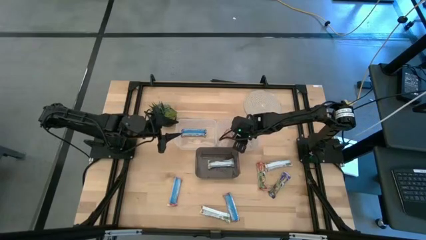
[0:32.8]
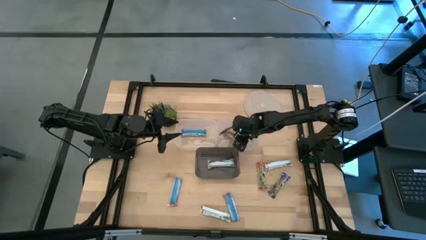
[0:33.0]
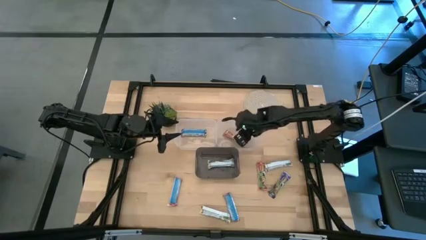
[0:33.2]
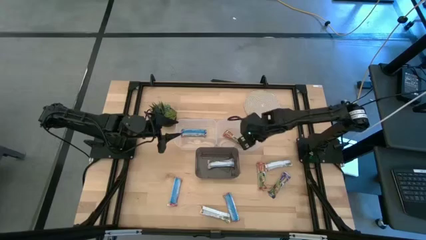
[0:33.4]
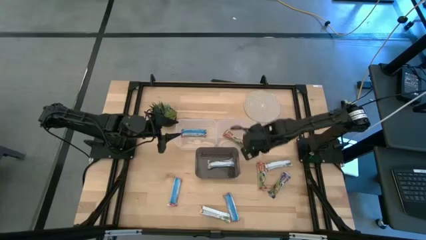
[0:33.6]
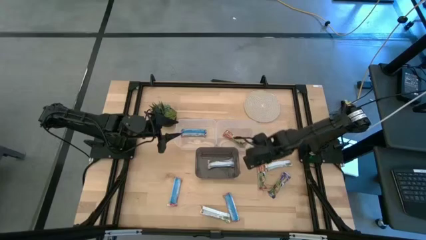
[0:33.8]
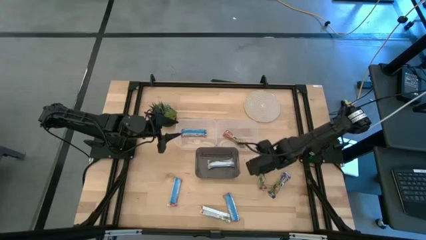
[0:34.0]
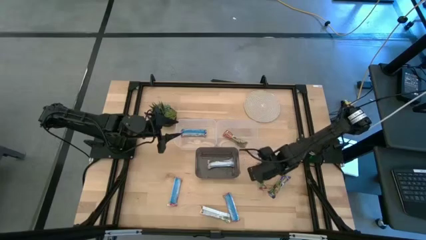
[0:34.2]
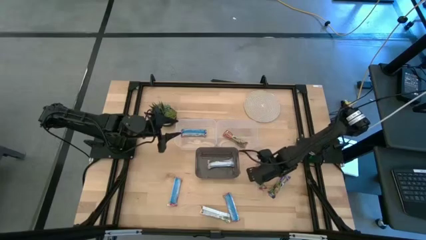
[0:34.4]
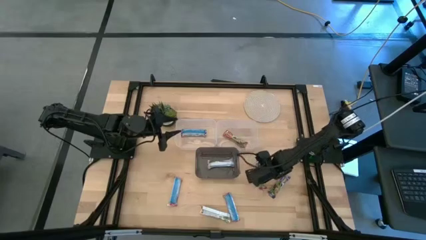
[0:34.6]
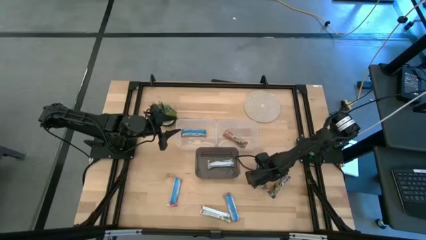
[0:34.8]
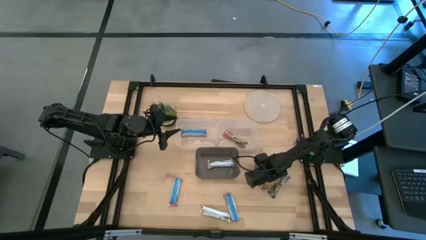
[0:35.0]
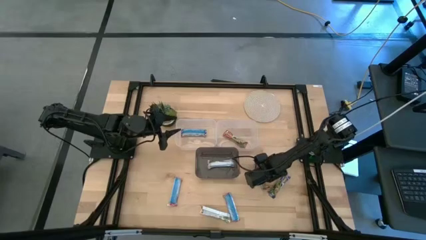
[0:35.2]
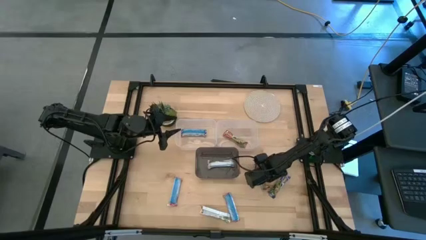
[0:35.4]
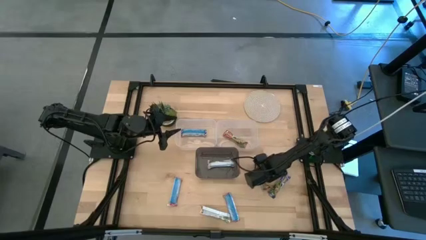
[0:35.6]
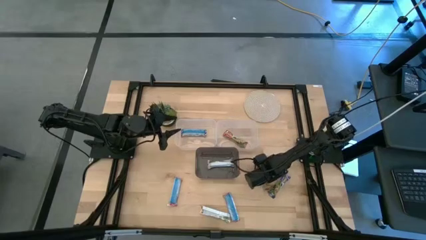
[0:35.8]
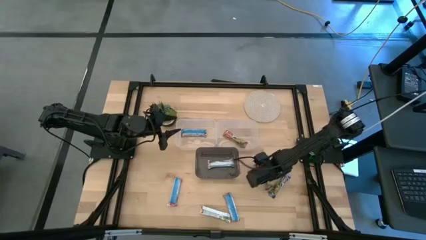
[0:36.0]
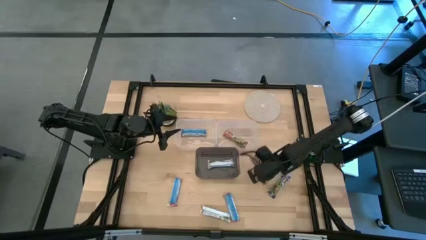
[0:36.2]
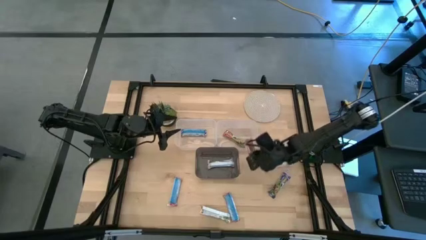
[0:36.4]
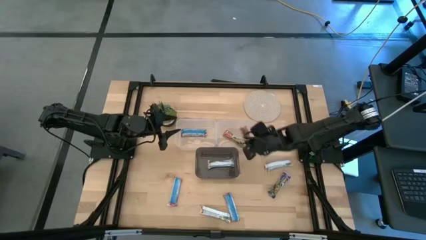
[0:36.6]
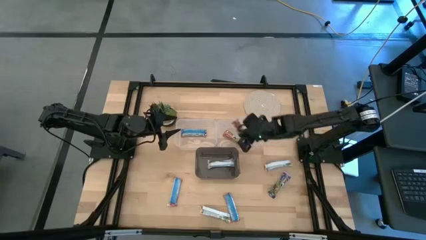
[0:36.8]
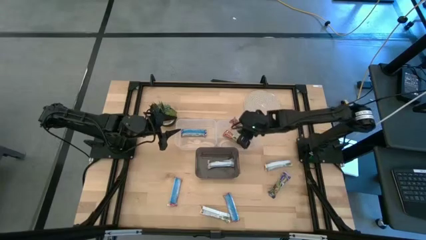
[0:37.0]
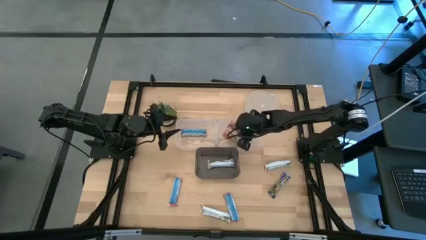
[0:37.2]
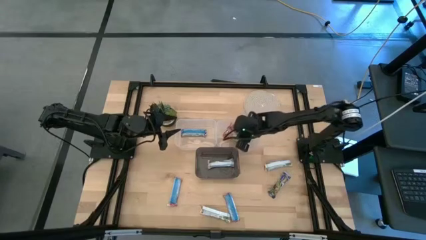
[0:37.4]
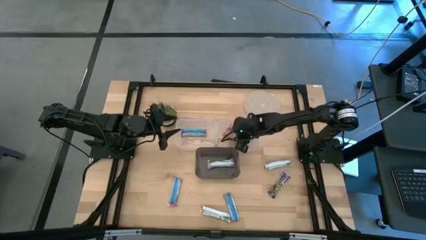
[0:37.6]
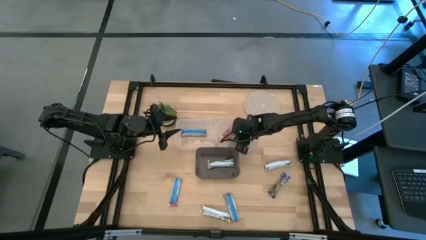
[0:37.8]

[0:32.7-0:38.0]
Task: Pick and place Granola Bars by type
Put the red granola bar into the right transparent bin

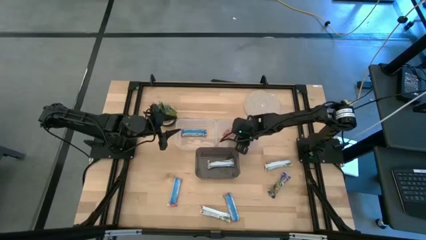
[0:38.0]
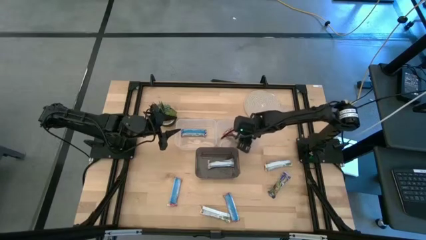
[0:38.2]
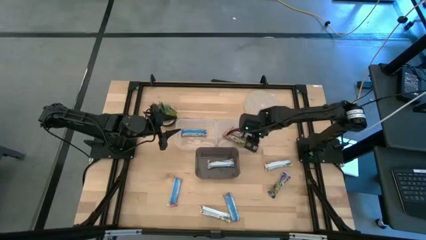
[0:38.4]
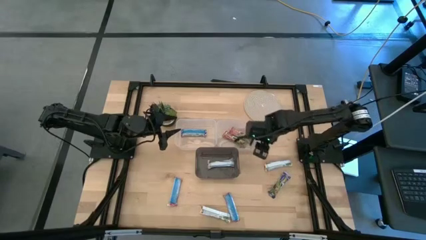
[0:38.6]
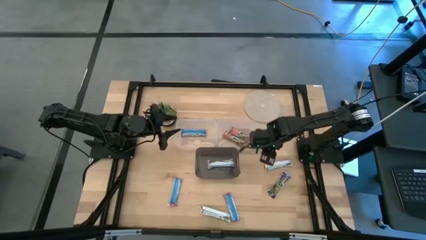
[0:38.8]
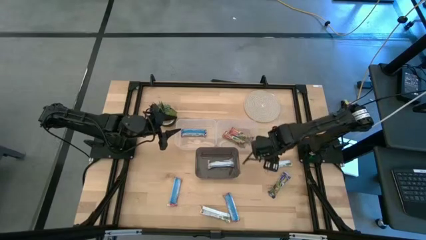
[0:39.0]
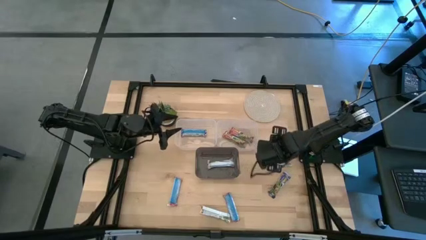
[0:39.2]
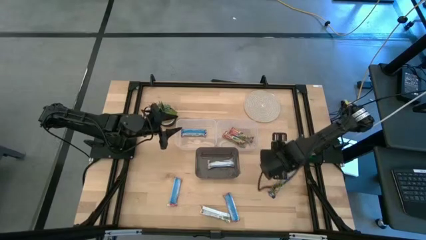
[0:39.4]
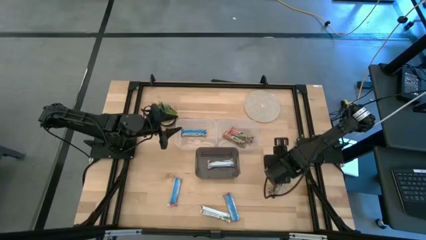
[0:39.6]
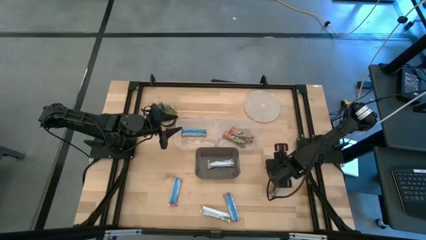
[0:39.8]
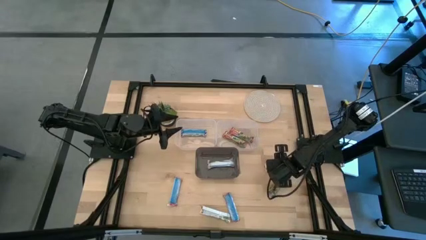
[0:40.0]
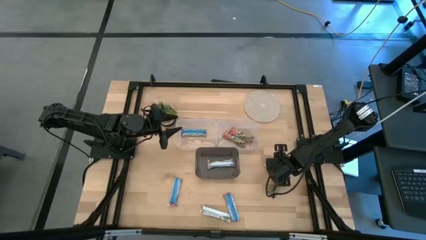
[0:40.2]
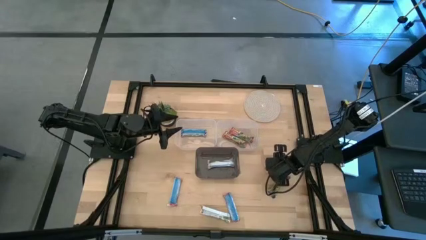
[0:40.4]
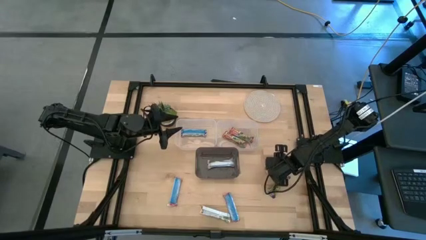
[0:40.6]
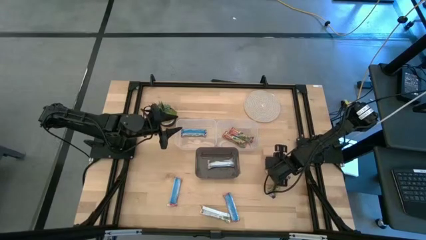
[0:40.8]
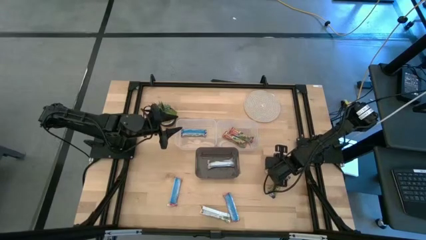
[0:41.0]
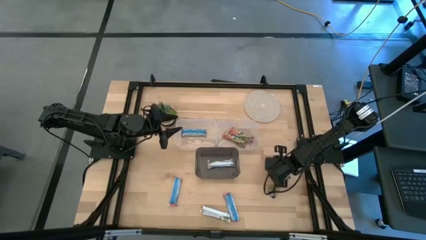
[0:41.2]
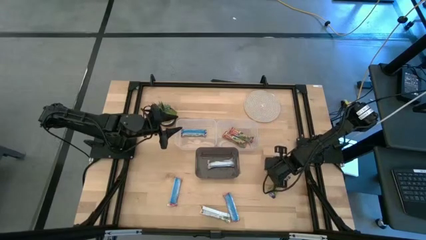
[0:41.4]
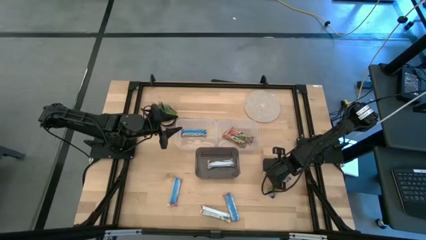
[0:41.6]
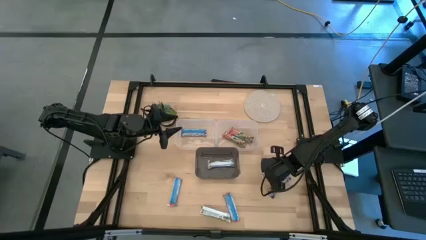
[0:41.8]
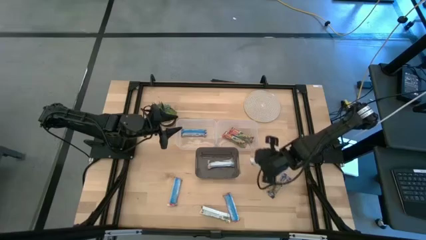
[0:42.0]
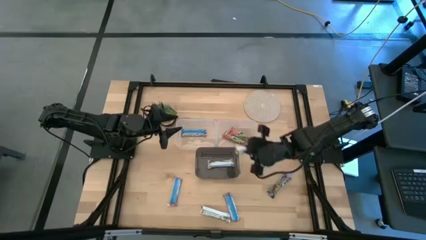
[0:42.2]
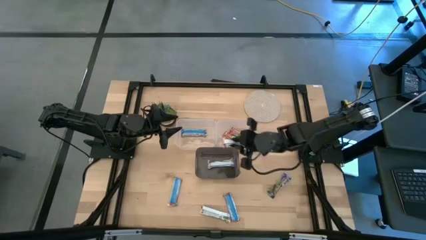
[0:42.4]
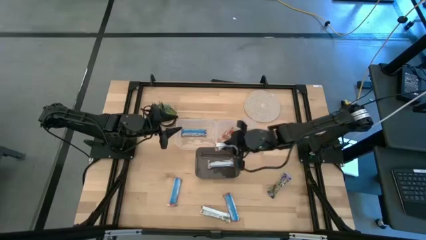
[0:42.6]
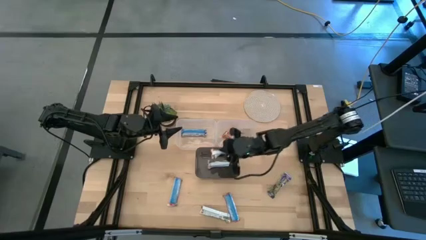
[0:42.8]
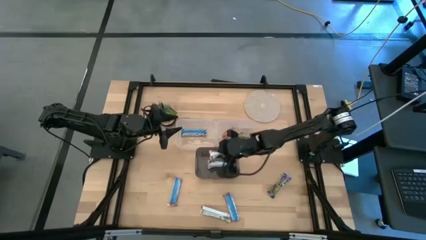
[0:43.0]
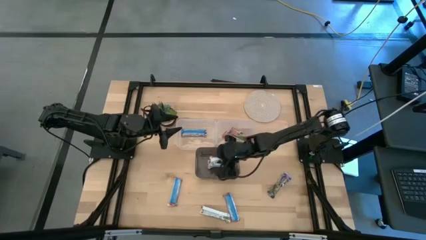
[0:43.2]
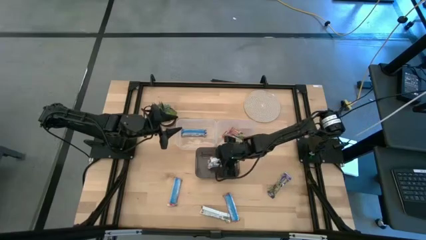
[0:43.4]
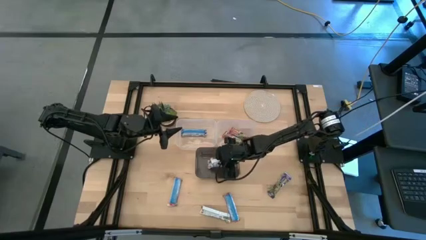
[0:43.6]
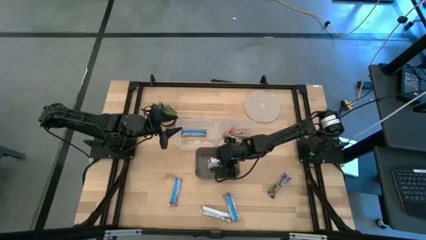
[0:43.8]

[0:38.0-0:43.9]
Put the yellow granola bar into the black bin

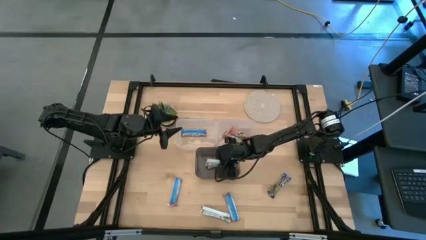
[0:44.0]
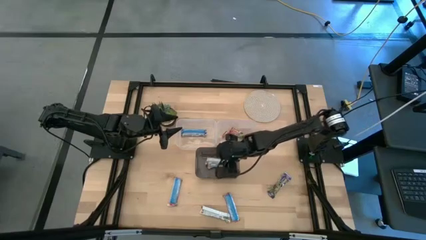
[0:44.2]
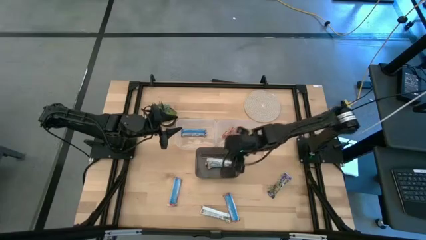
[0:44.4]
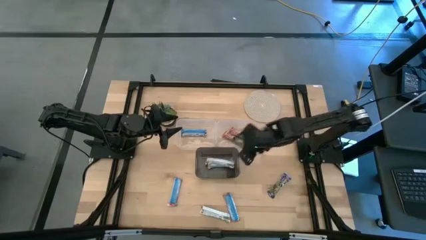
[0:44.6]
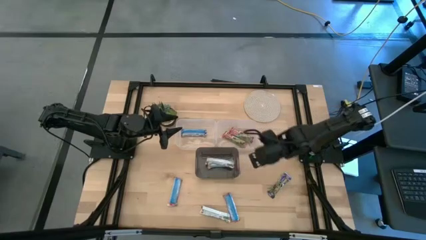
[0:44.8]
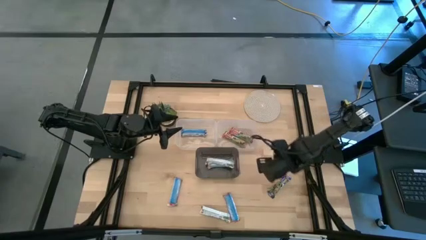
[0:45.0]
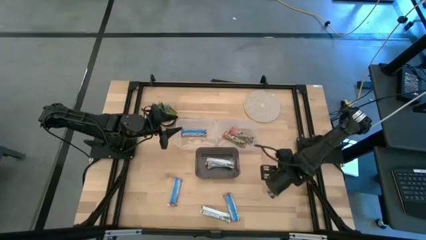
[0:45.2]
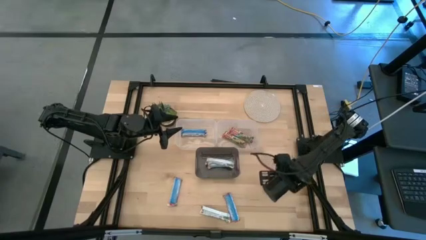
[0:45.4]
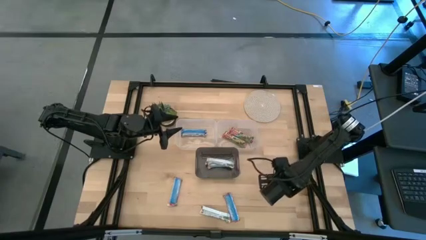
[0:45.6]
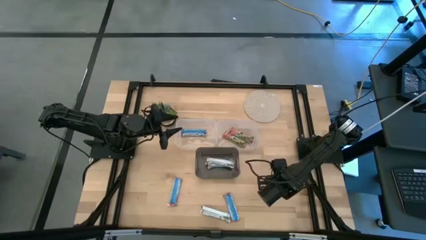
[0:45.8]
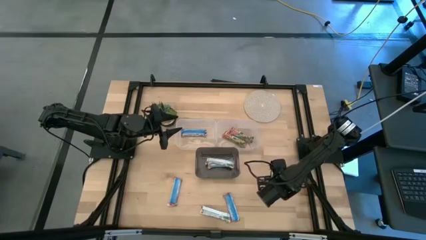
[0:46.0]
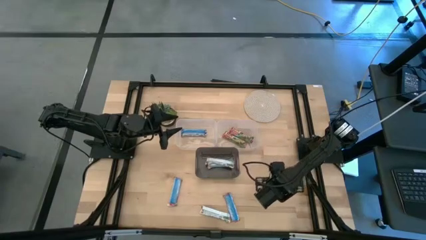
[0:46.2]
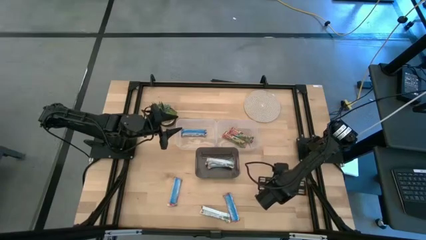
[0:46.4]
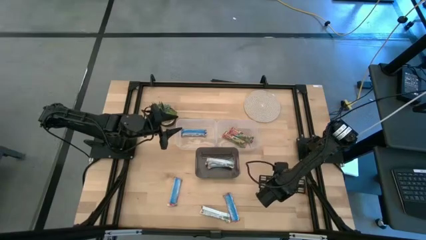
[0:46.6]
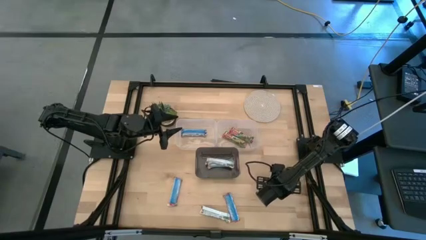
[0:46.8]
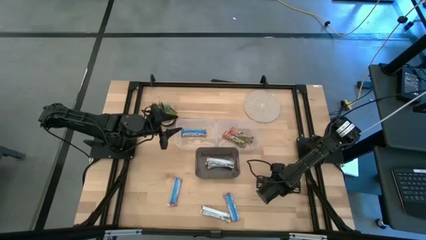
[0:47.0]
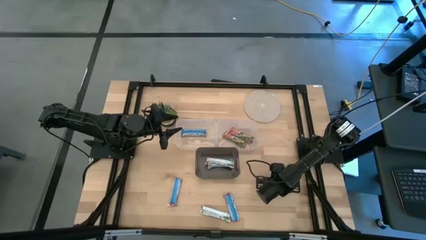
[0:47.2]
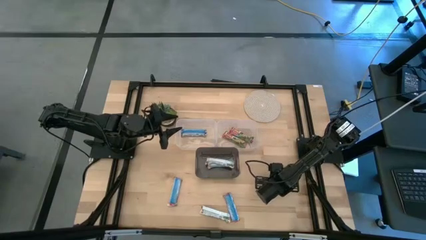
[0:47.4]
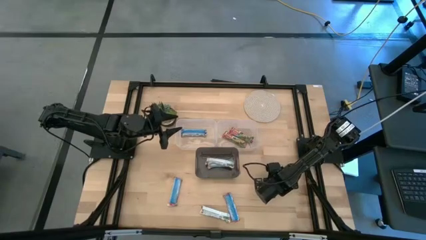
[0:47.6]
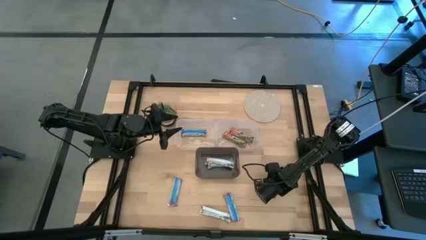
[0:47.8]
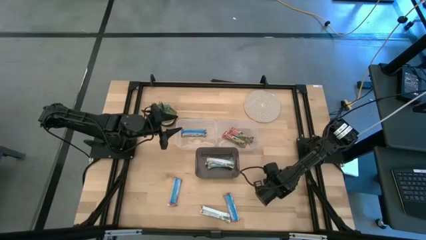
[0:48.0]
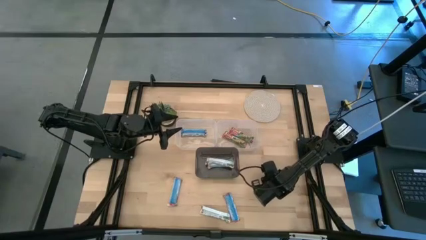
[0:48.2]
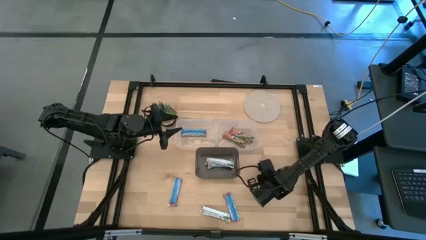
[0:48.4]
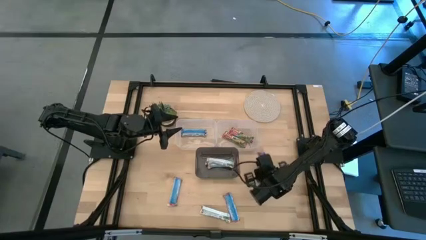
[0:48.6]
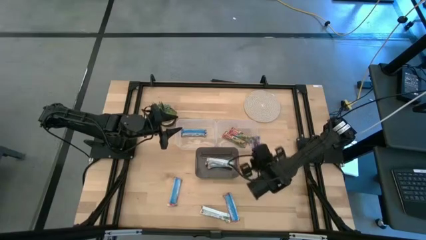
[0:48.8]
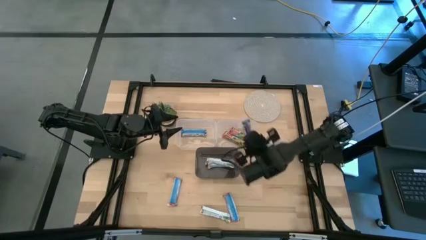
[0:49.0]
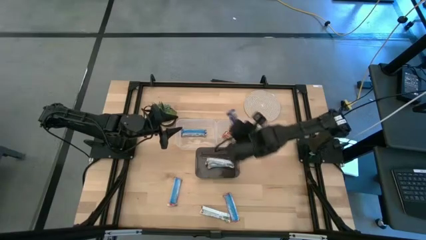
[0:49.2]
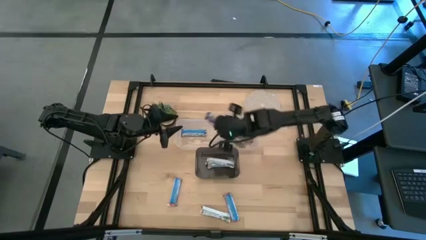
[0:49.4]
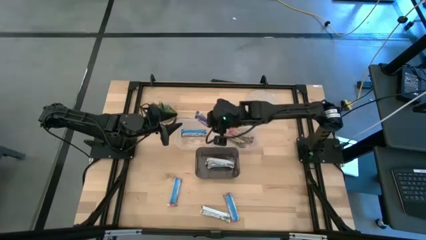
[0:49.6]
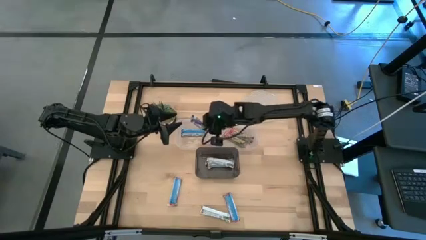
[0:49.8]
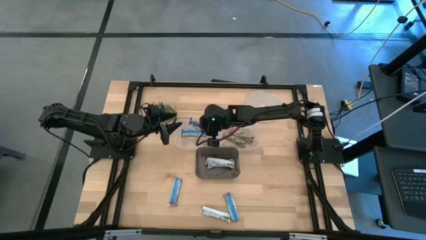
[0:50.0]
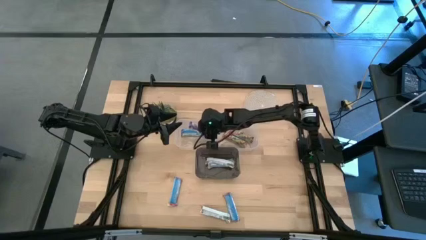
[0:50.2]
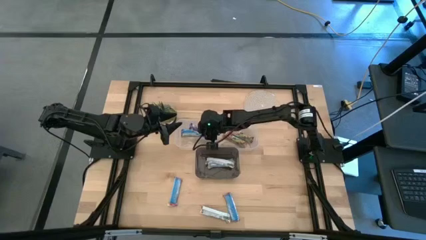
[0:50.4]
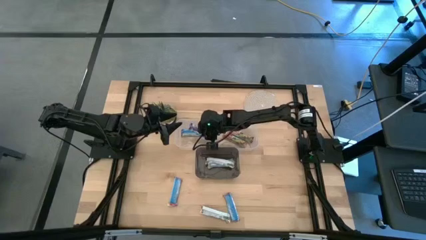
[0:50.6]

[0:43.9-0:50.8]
Put the blue granola bar into the left transparent bin
